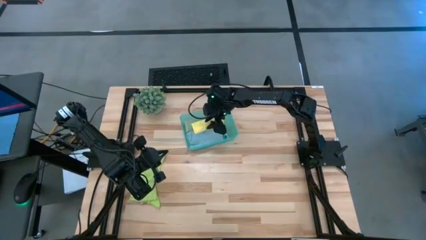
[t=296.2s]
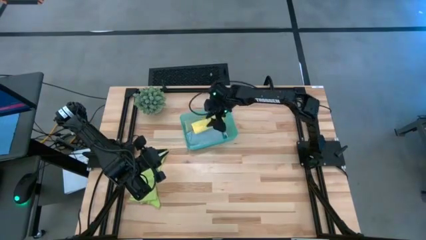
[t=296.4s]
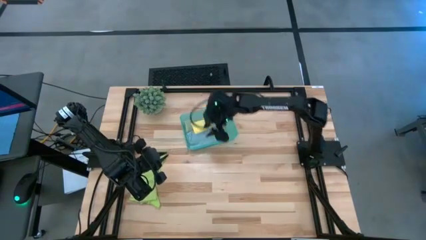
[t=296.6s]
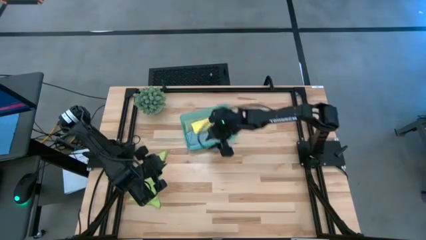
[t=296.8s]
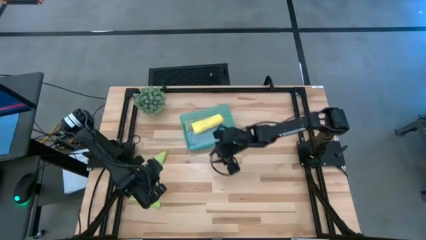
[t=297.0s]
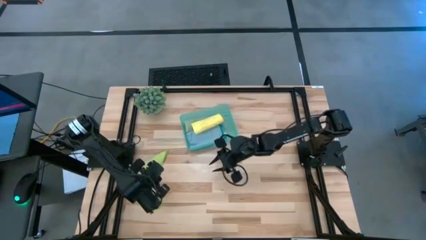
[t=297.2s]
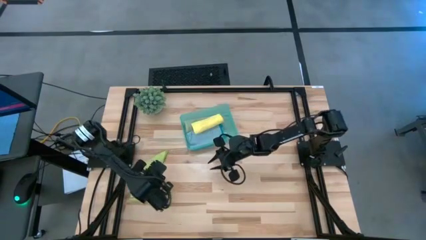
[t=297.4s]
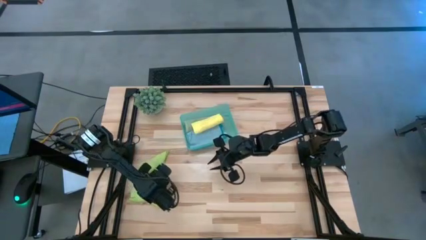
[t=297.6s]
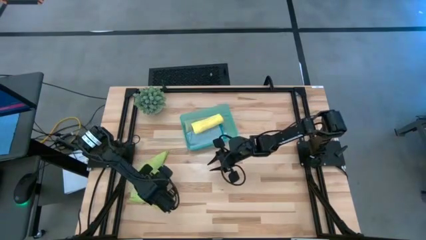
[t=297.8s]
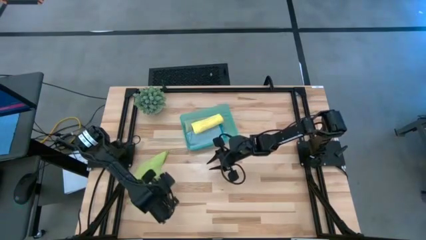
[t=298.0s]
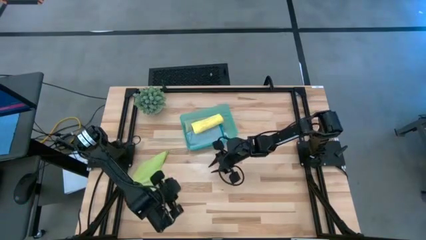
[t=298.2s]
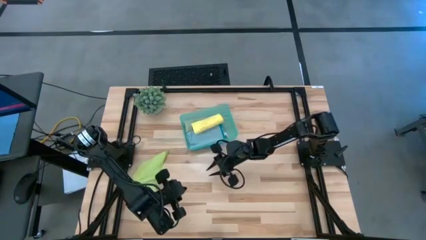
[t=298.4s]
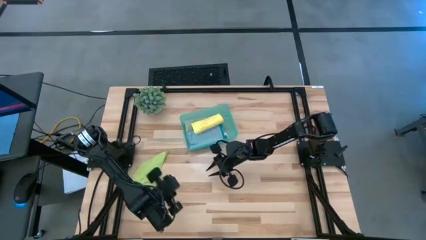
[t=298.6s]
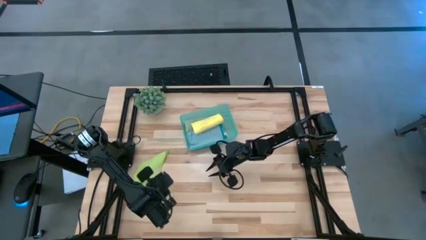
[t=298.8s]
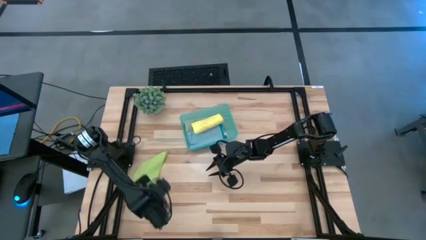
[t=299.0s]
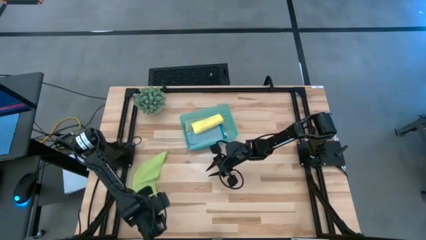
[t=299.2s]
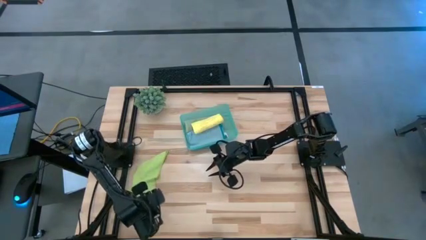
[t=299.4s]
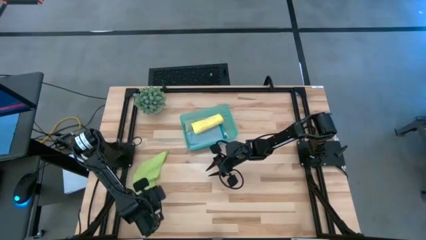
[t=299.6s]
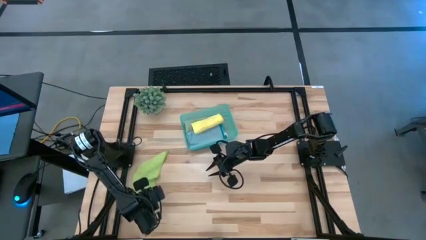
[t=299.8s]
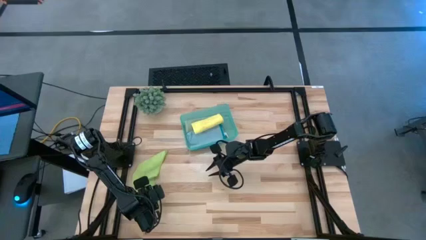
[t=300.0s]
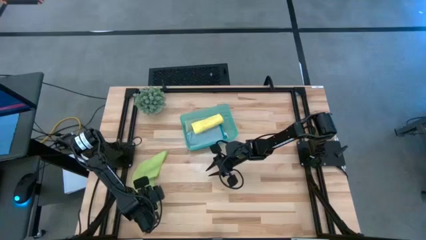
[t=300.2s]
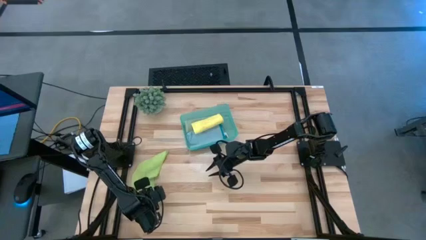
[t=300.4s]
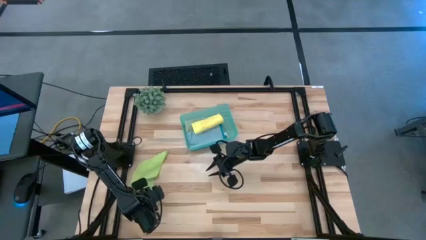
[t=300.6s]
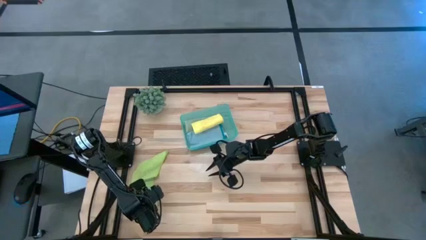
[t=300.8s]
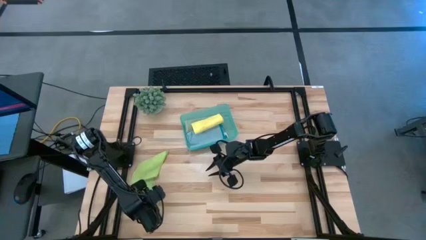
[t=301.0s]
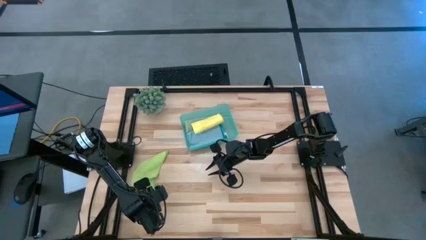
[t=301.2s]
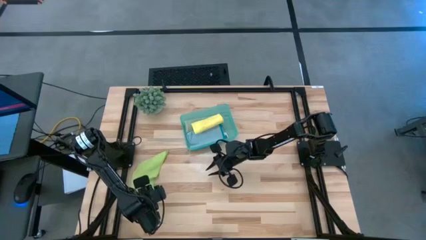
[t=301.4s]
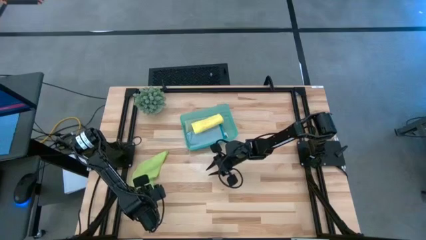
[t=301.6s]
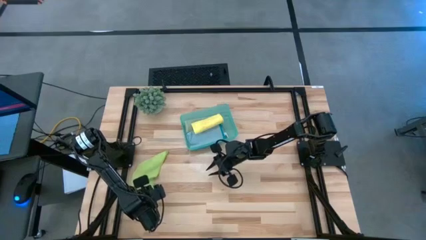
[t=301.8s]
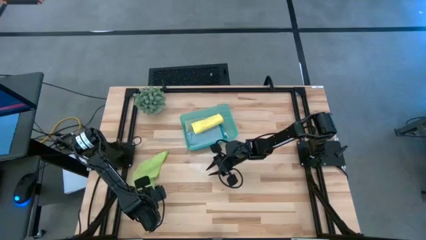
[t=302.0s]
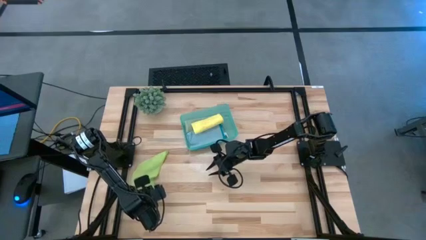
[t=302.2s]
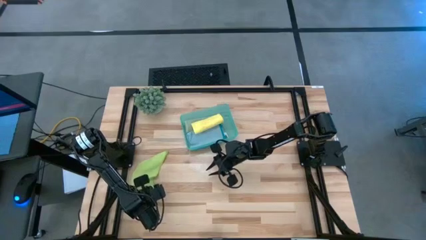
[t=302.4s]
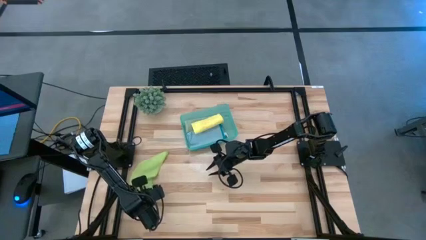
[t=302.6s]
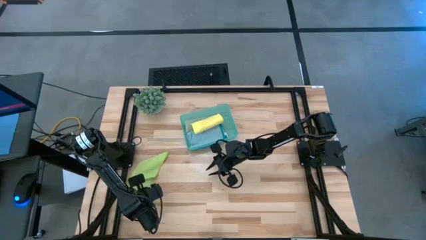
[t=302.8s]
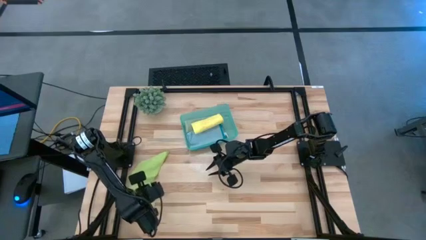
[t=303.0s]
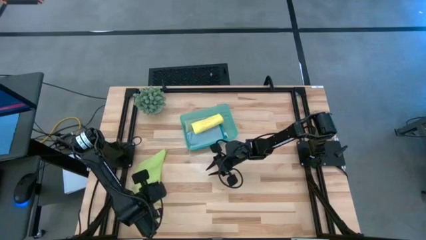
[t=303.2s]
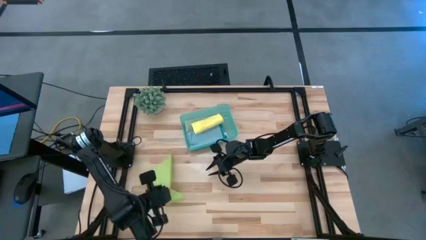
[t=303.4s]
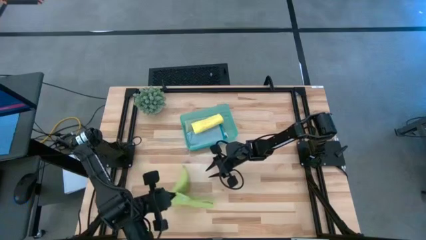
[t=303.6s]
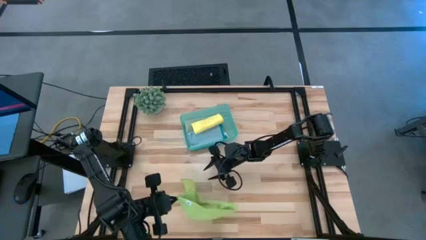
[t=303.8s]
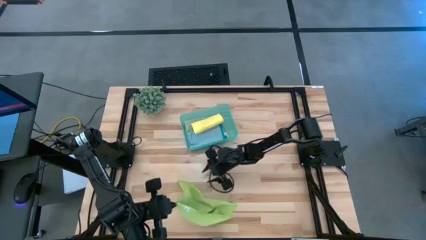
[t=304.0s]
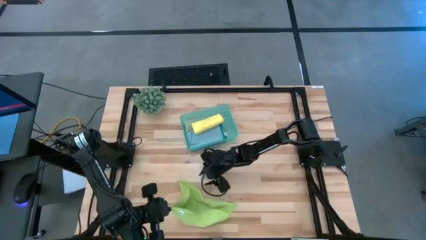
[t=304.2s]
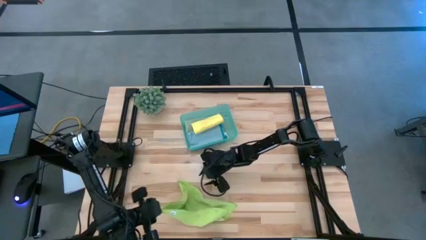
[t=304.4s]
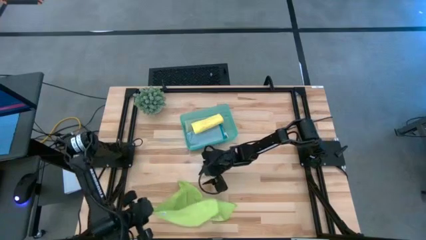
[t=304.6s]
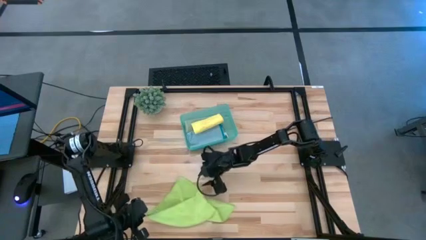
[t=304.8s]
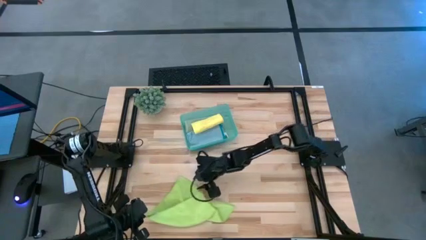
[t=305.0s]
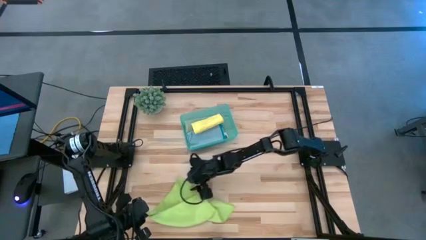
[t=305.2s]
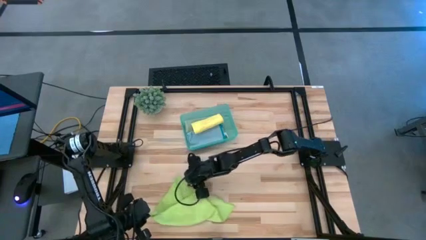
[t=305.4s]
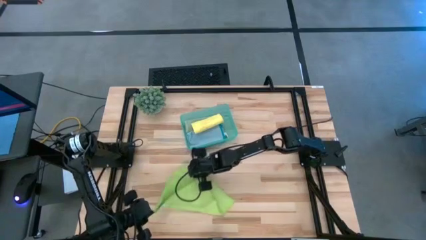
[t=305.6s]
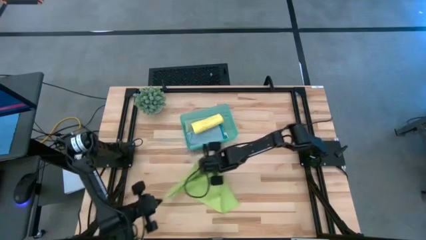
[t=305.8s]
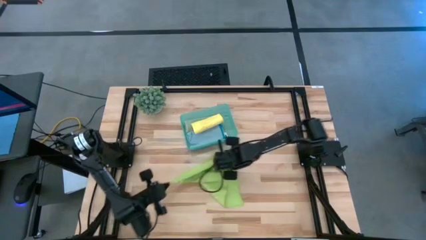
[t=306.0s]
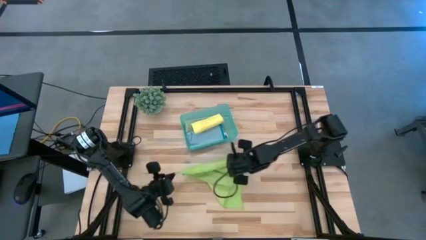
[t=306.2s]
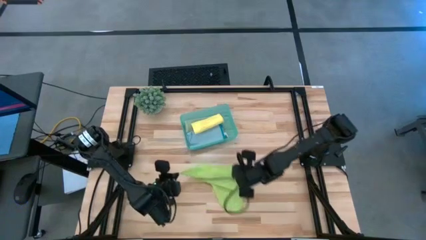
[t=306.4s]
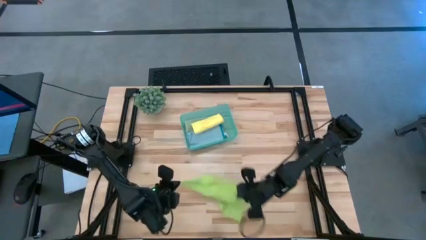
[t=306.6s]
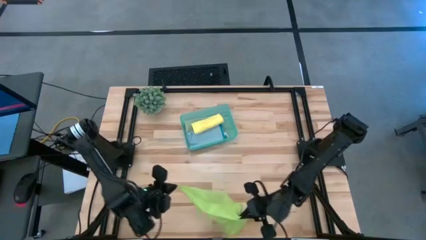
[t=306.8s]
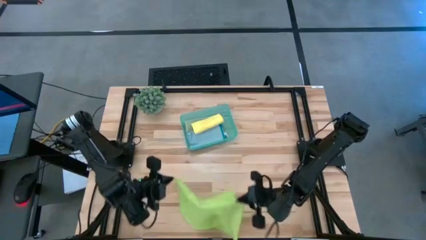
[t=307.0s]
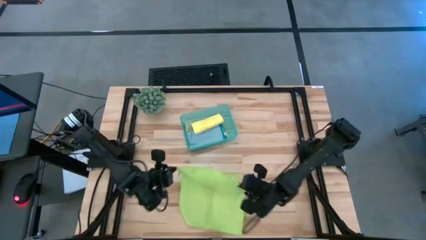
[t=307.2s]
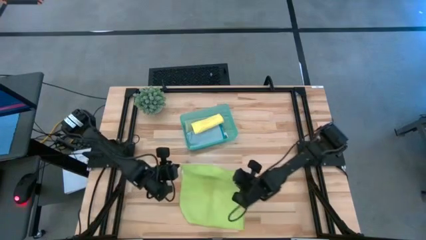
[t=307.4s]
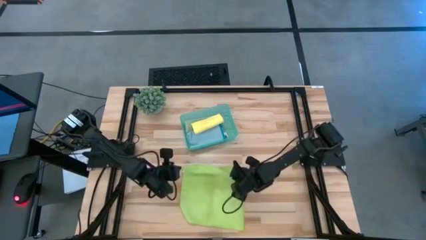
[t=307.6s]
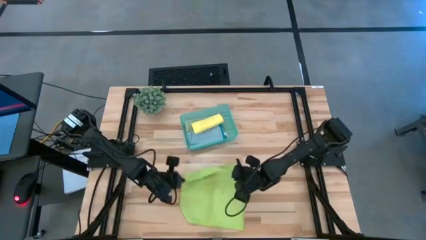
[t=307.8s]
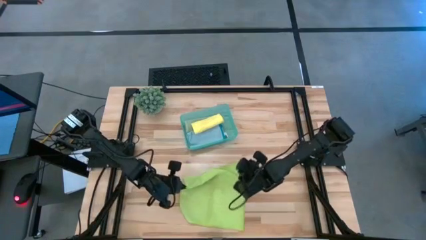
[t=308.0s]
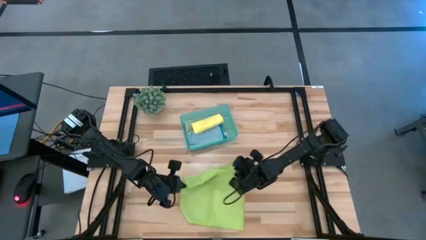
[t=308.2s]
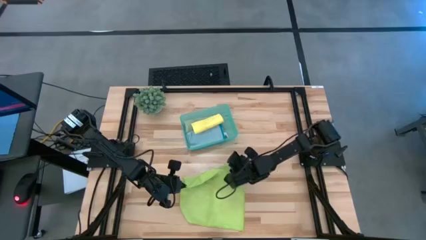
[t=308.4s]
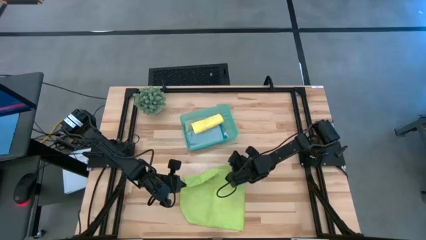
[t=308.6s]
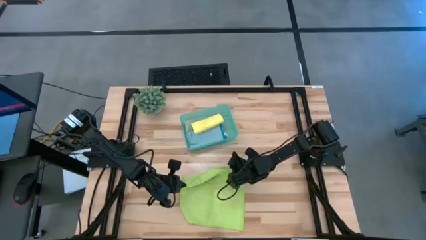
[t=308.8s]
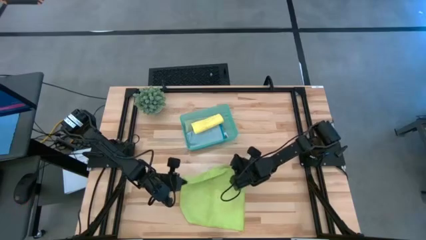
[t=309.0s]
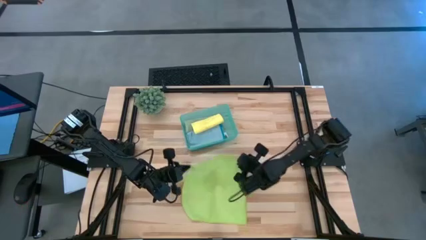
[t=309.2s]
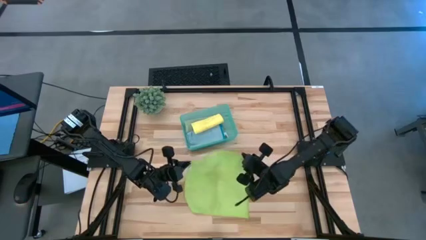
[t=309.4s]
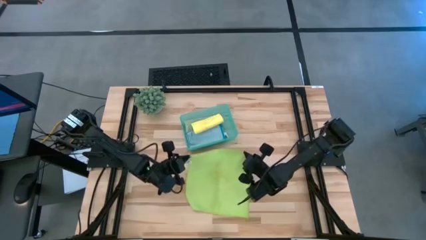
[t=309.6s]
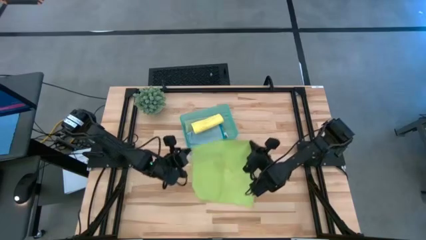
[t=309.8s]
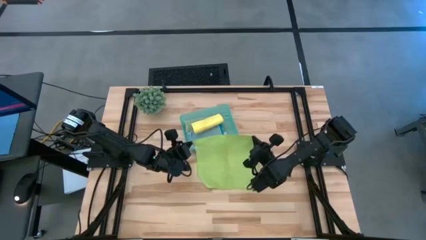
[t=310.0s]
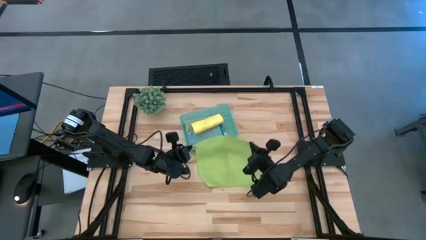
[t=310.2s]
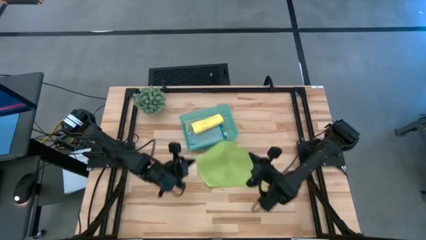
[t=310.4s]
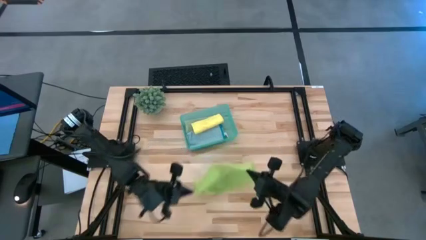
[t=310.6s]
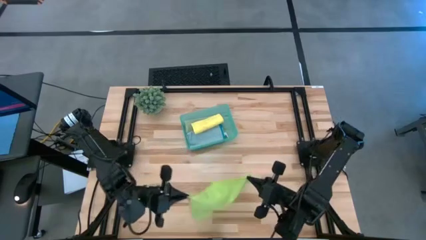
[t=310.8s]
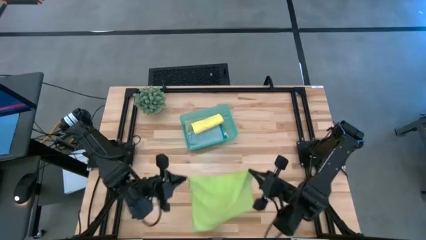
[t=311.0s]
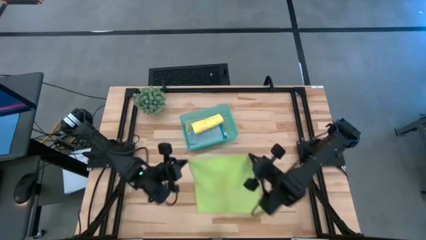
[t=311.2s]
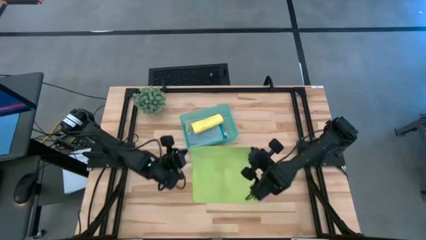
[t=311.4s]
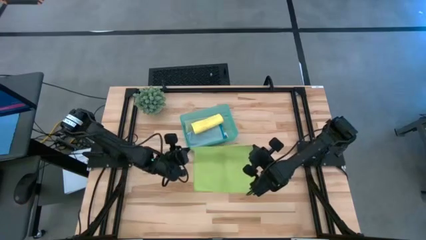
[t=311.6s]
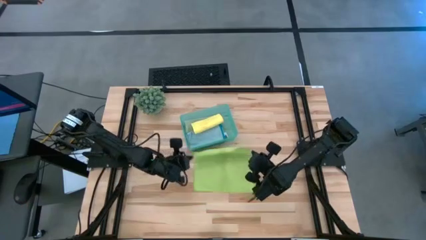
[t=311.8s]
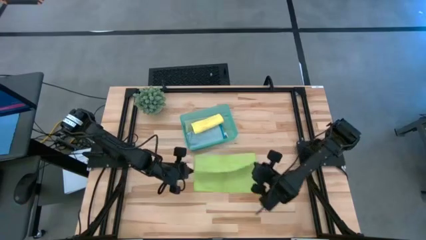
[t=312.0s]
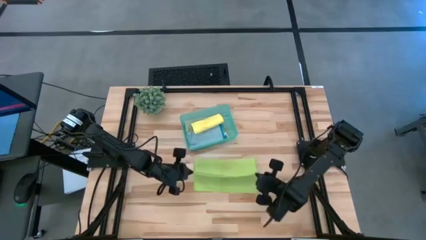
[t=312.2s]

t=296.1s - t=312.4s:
Task: Fold microfiber towels
Fold the light green towel
